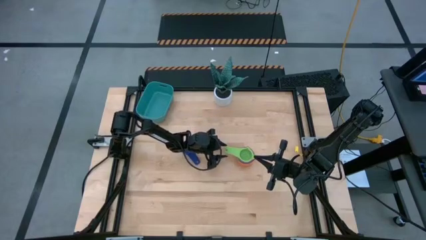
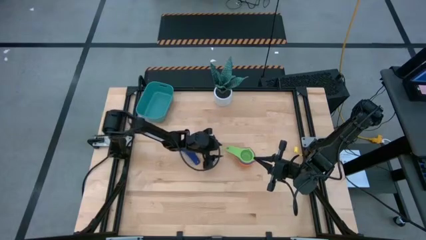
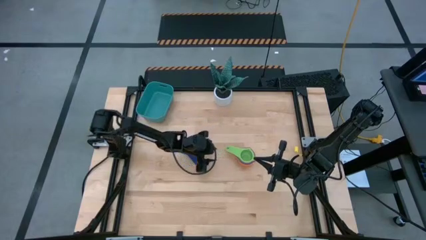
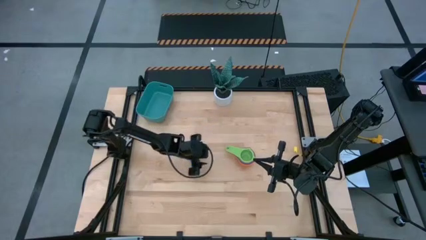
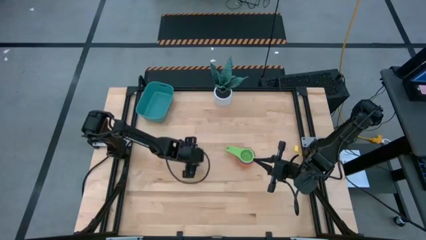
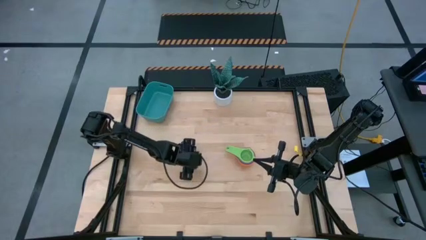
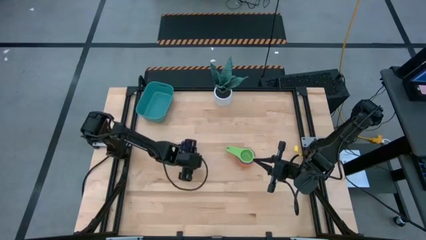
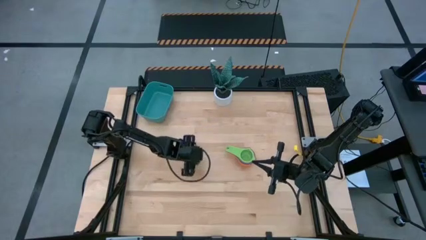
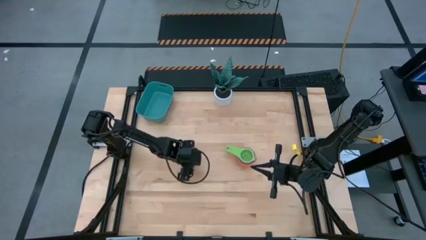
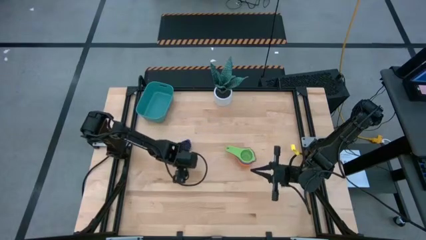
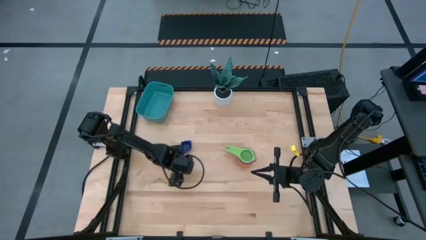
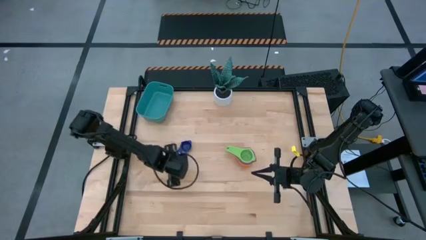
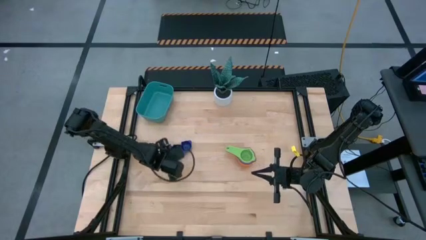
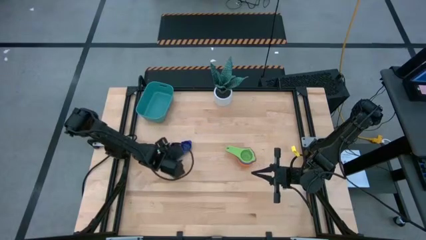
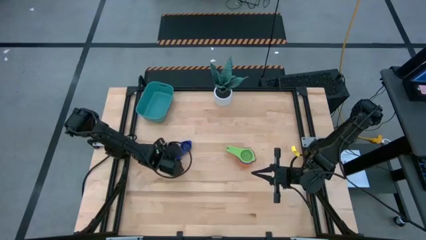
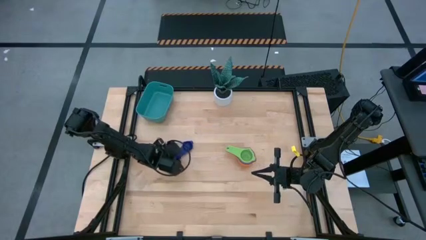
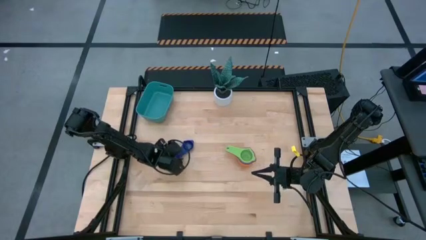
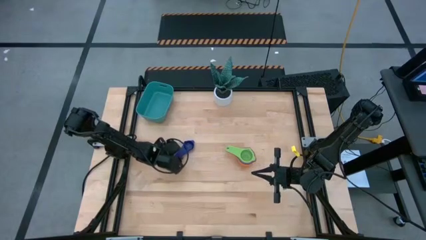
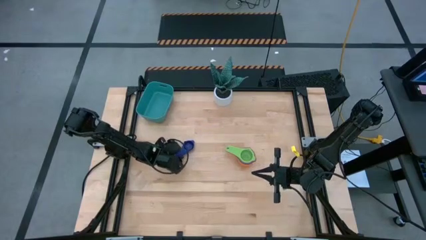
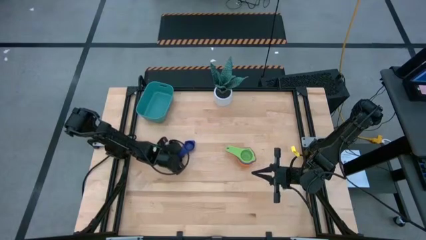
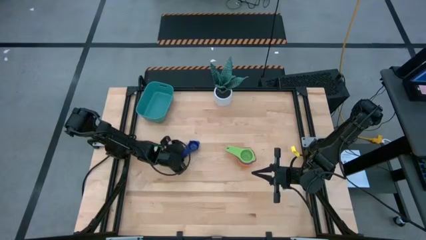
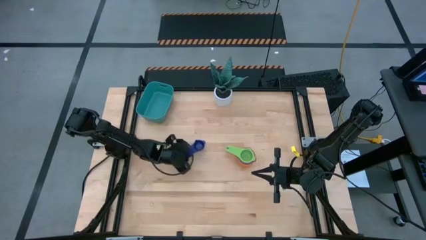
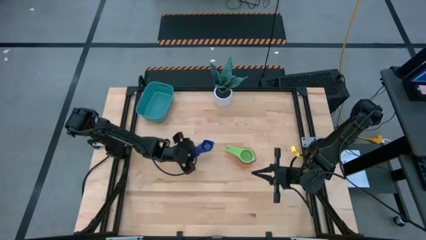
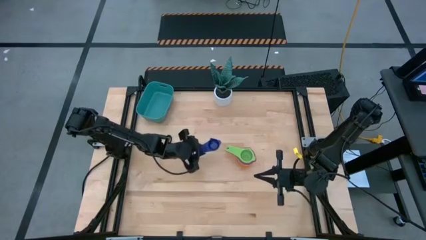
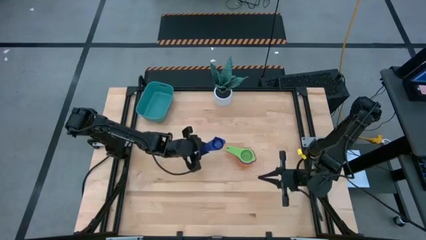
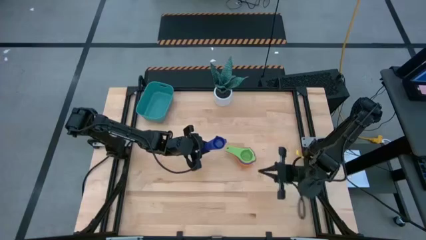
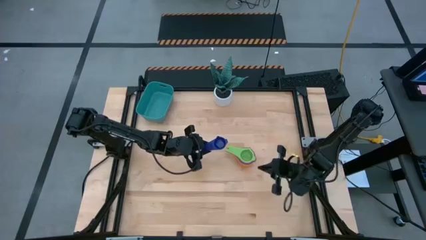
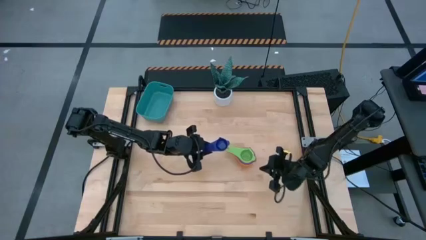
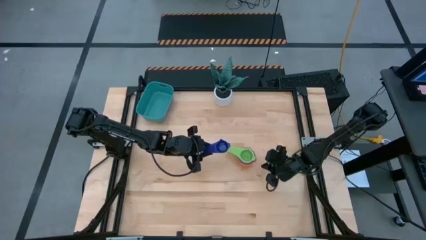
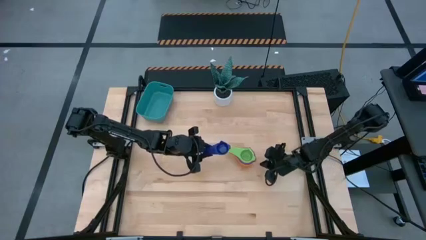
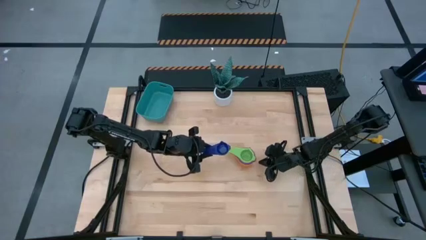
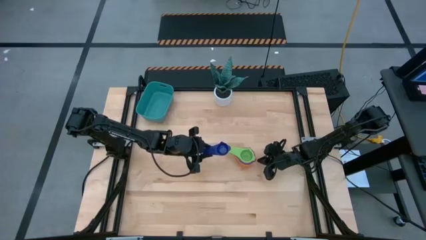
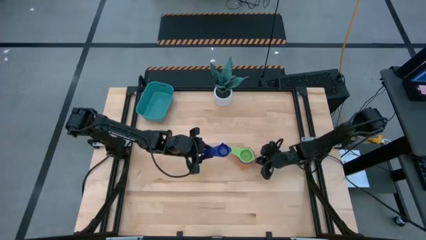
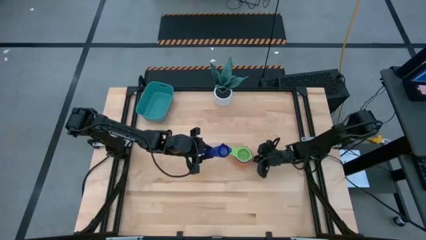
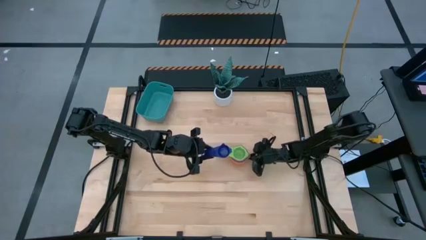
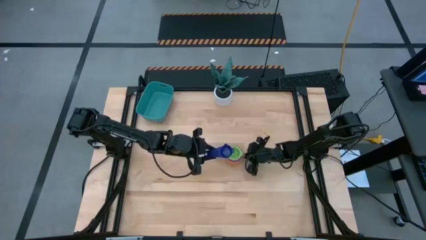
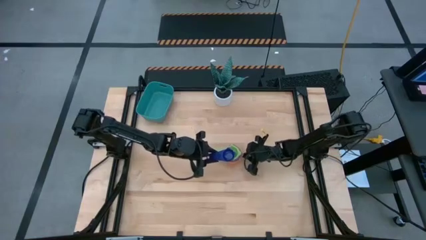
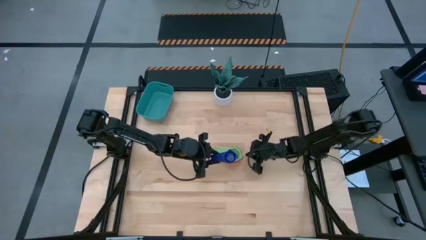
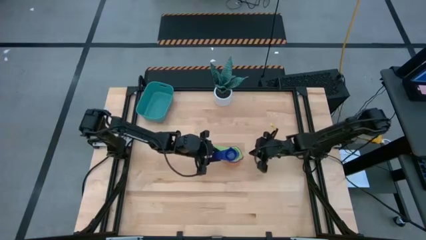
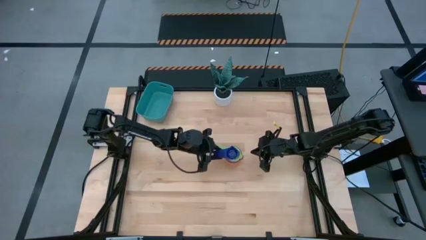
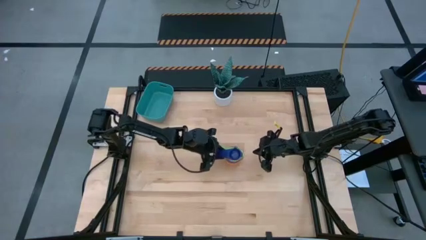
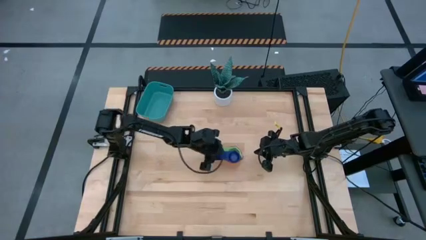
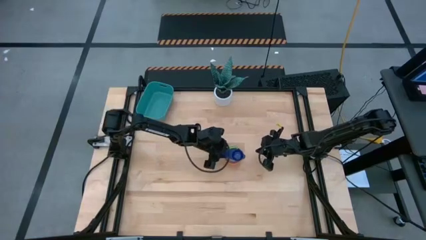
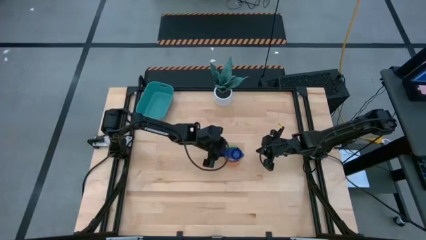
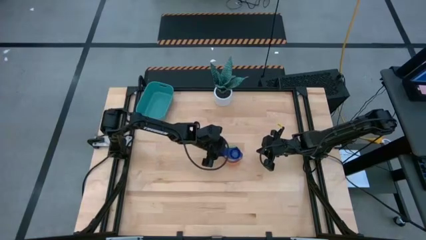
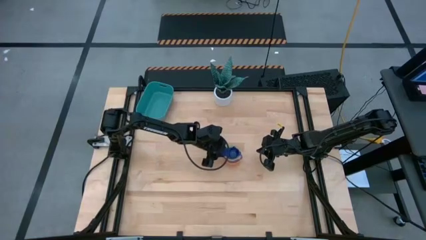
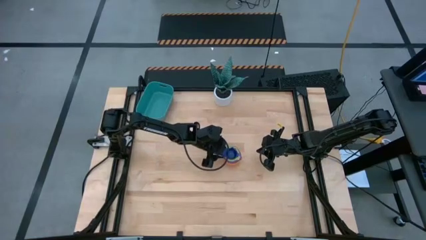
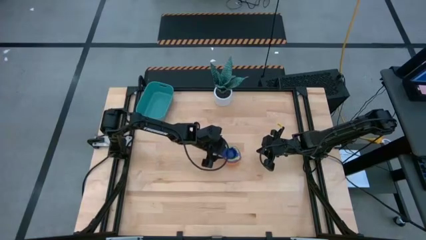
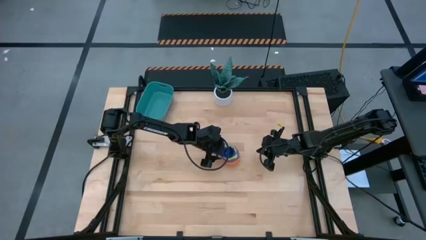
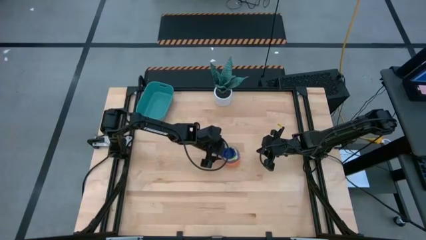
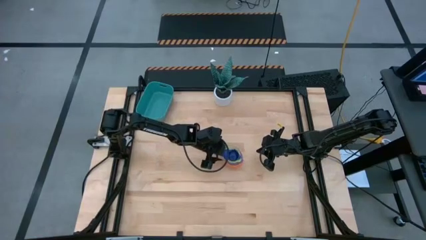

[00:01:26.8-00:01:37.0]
Task: Nest measuring cups in basket
Stack the dark blue measuring cup on top of the green measuring cup

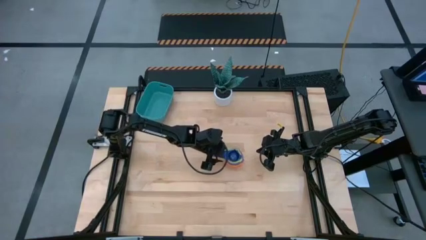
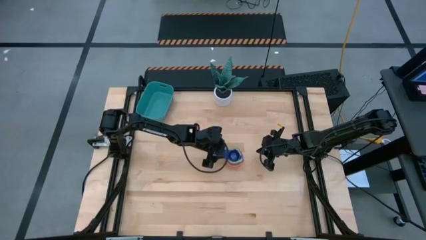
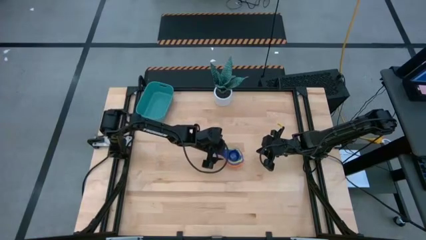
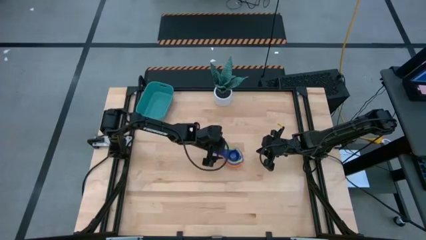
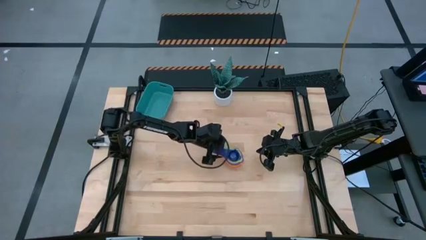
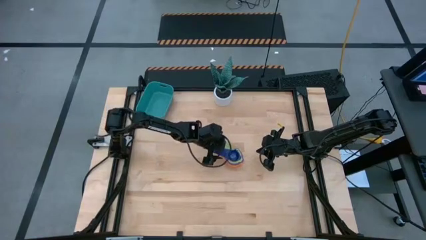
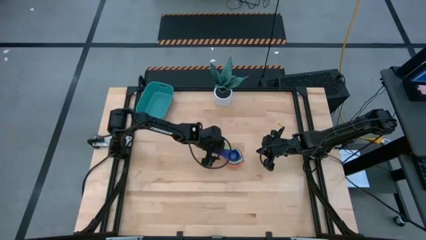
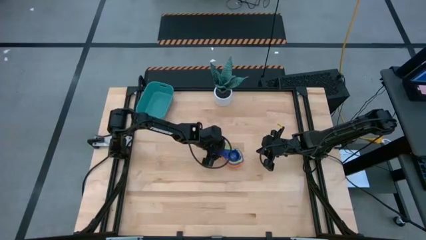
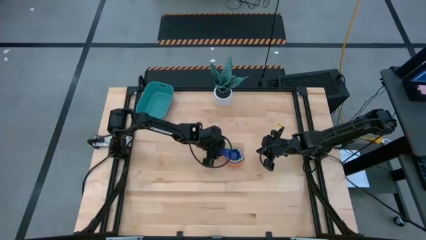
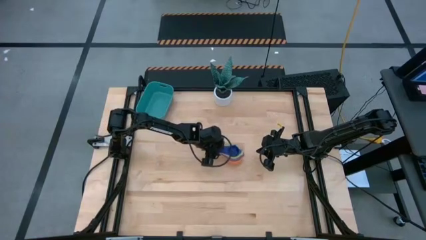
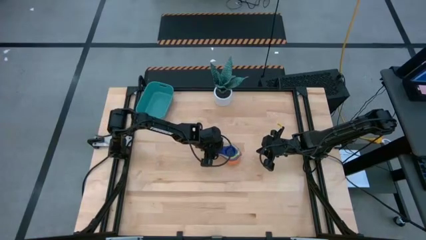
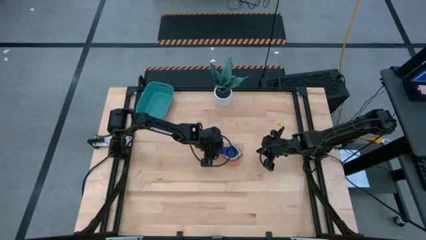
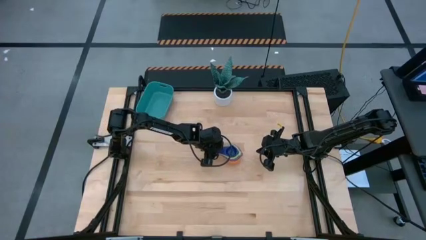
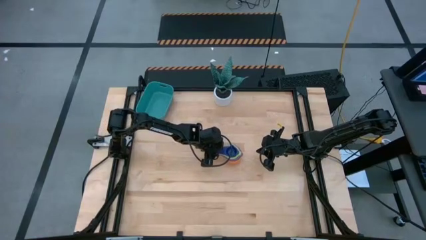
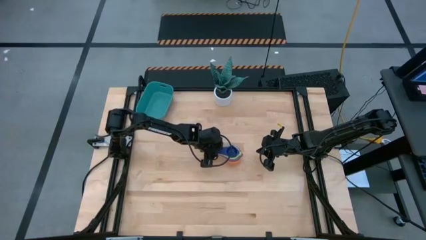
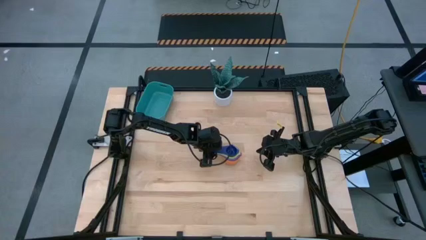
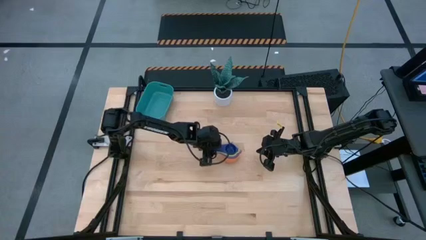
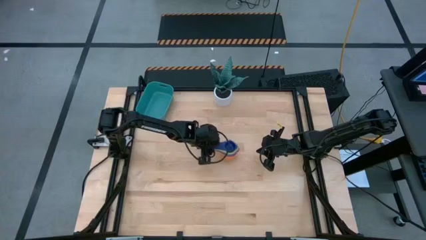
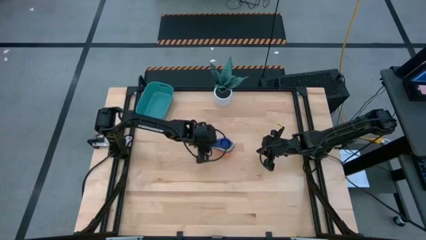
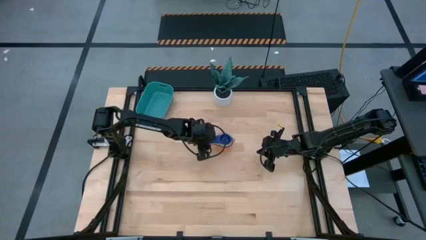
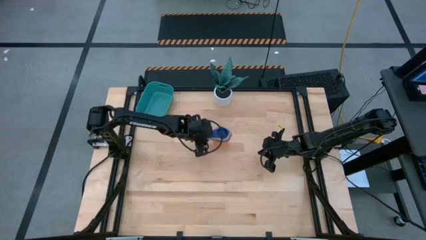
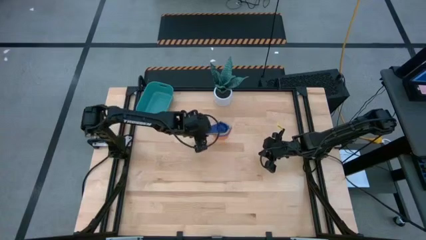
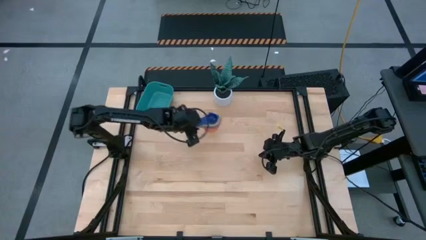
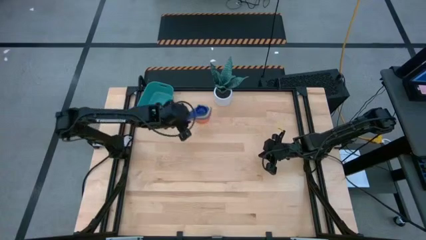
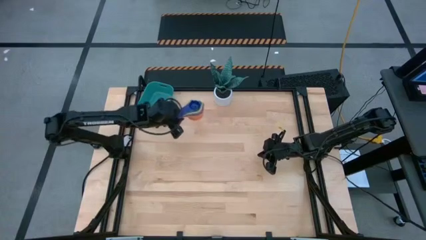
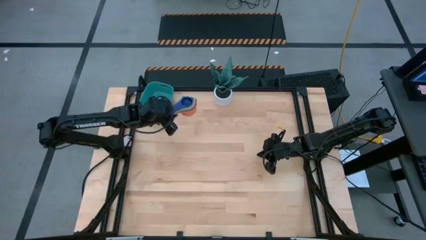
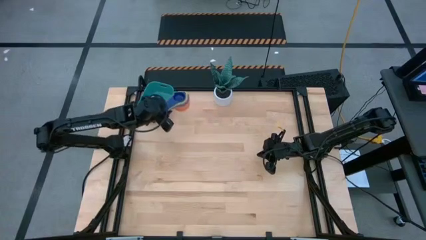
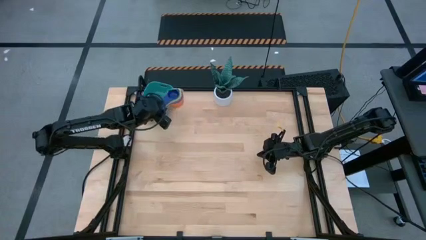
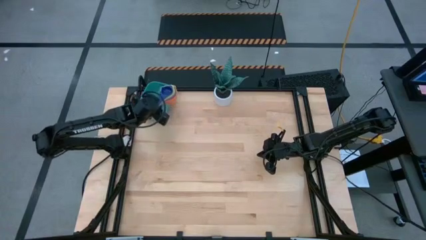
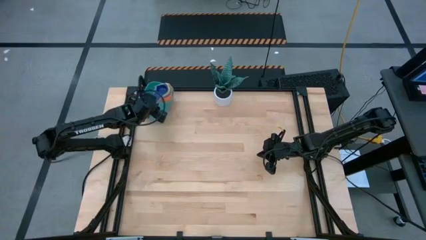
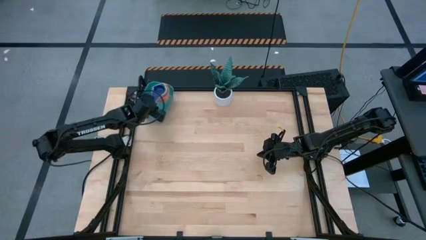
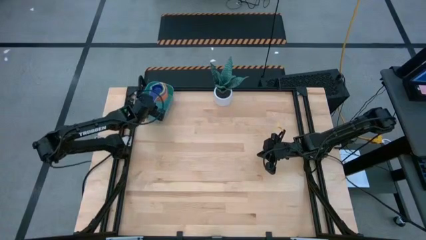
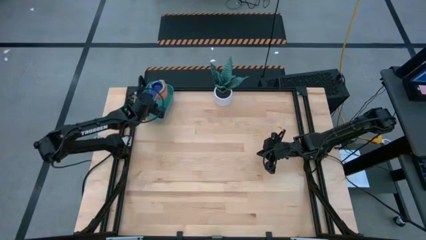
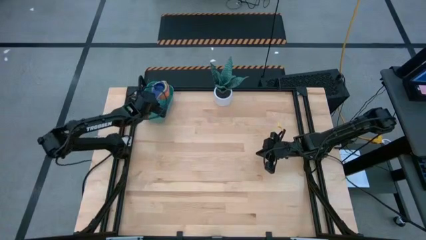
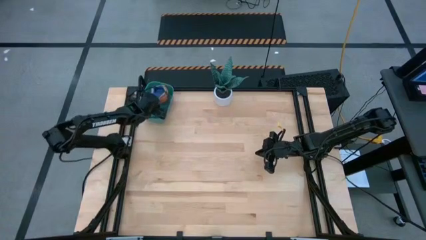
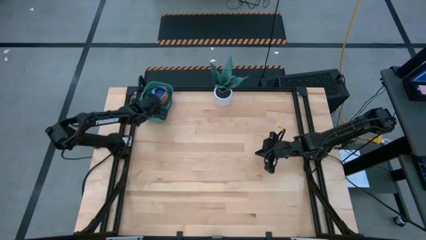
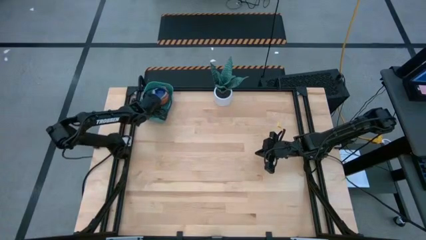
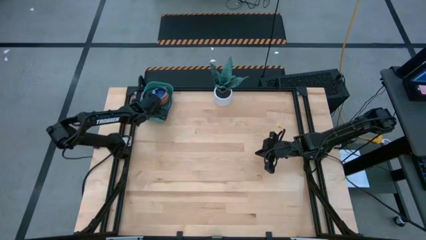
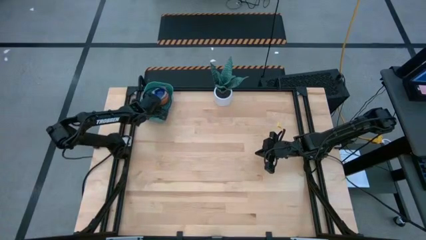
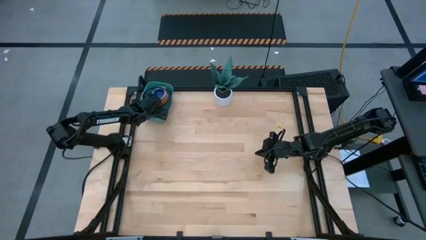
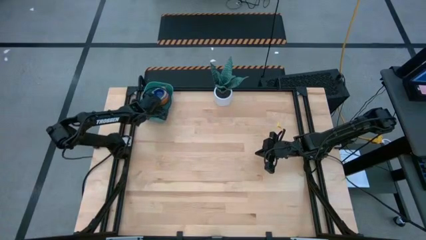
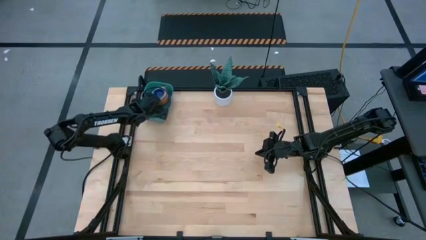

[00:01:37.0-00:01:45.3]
Put the nested measuring cups into the bin
